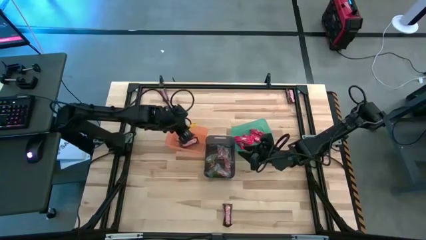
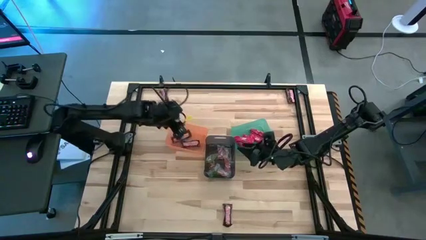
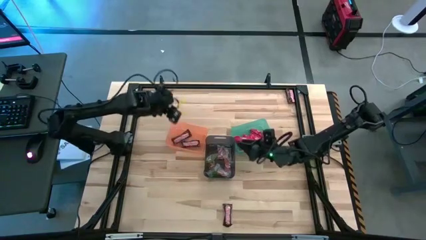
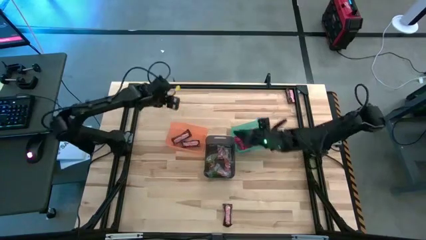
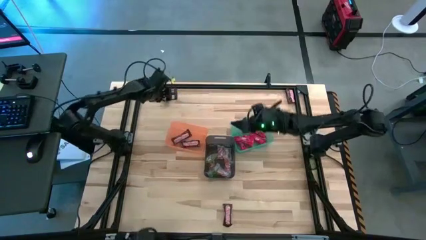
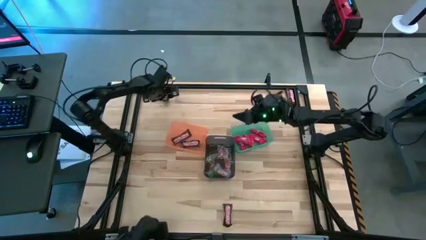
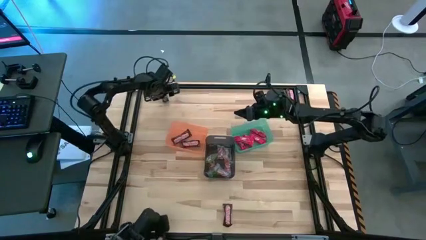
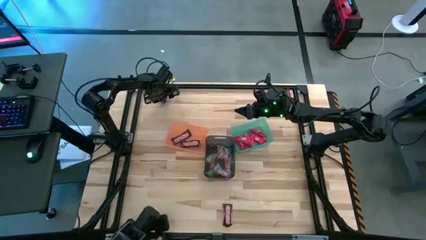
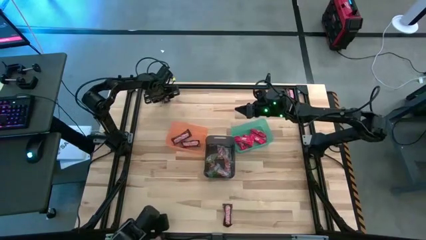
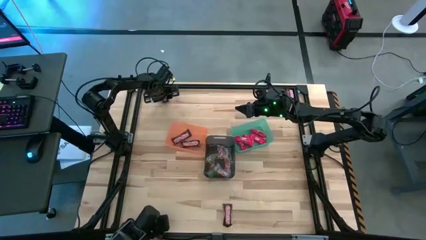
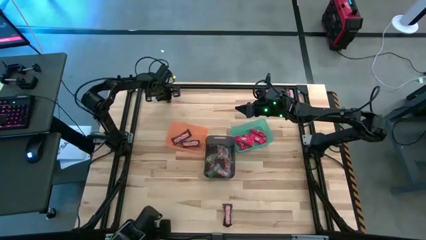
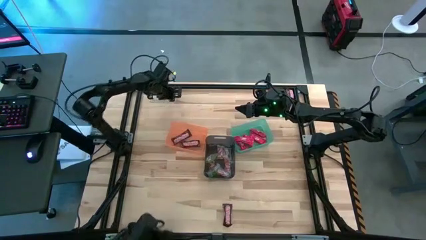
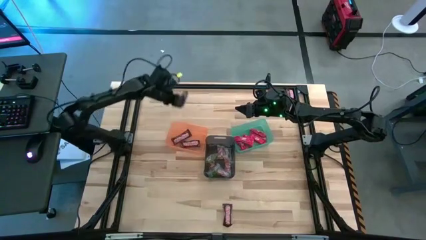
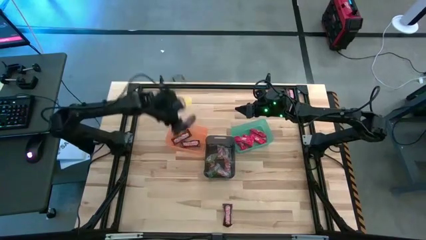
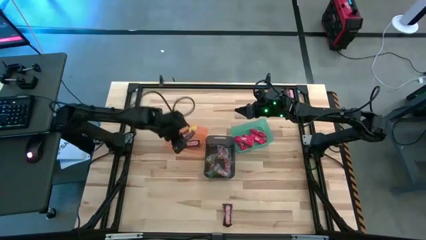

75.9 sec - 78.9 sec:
Task: Sort candy by brand, put in halloween buckets
Put the brown chocolate bar into the orange bin

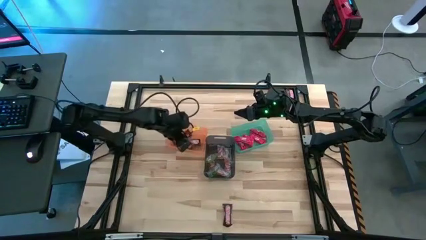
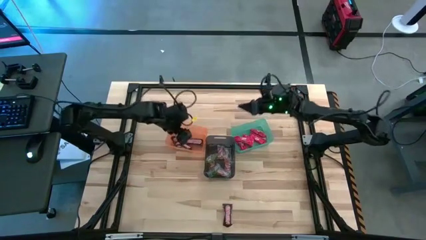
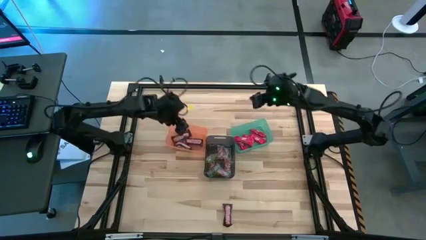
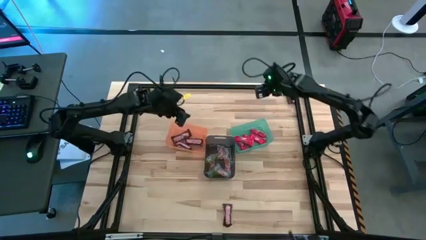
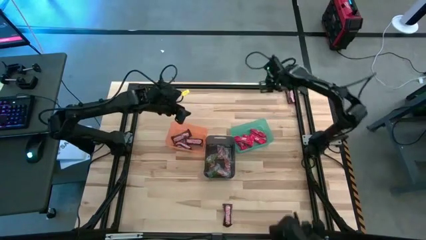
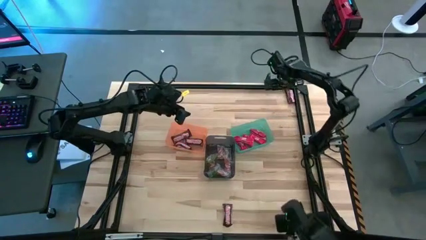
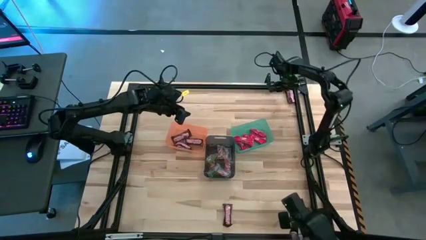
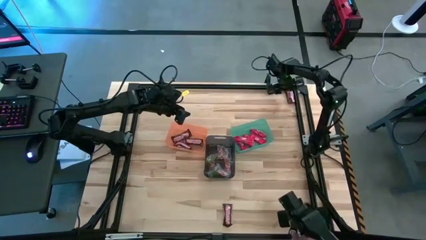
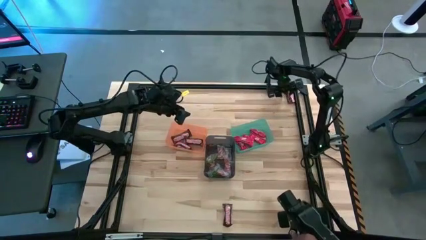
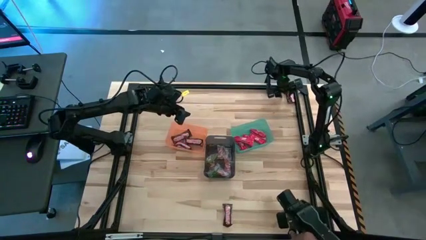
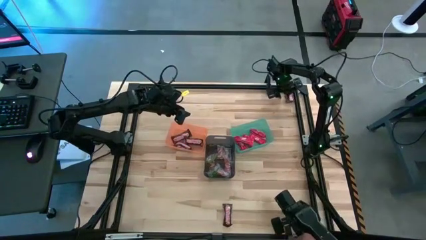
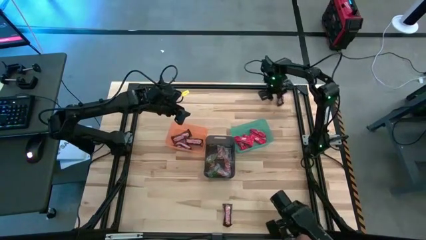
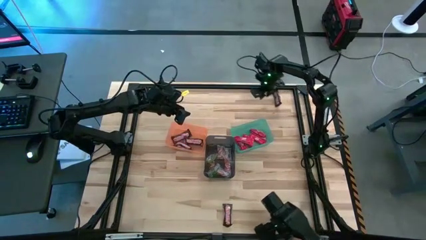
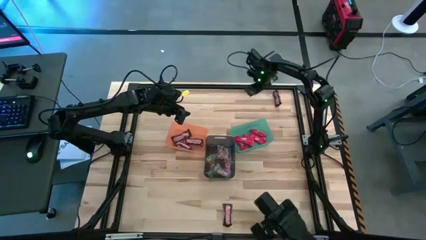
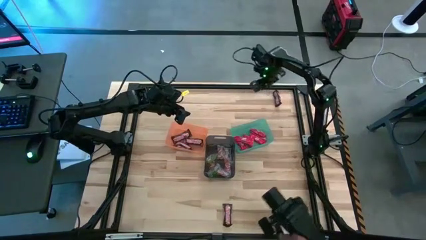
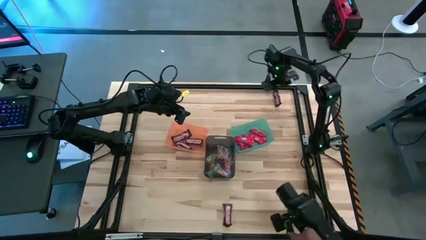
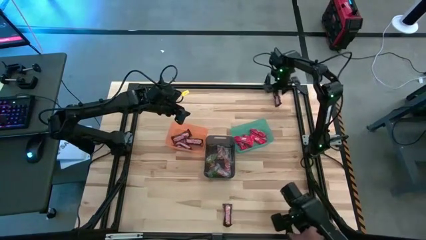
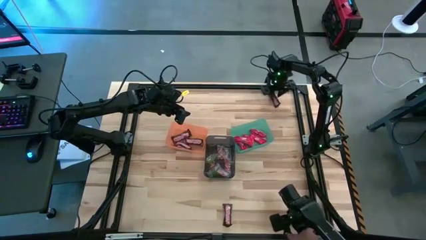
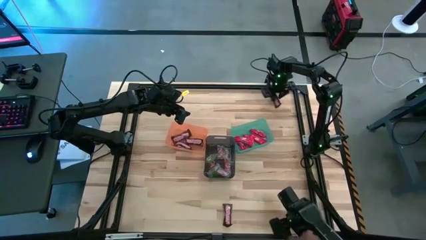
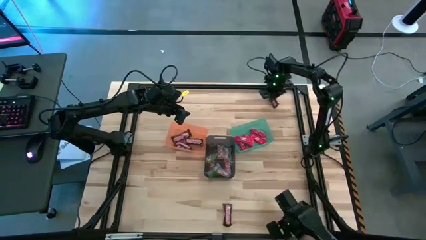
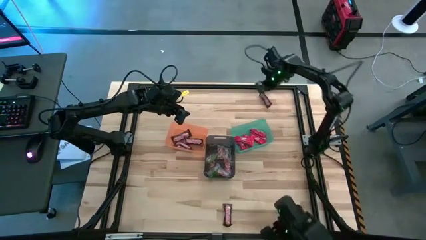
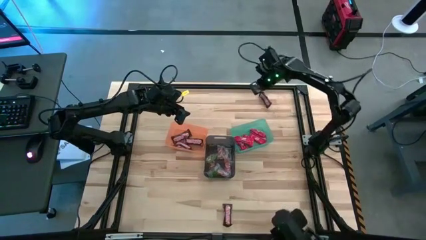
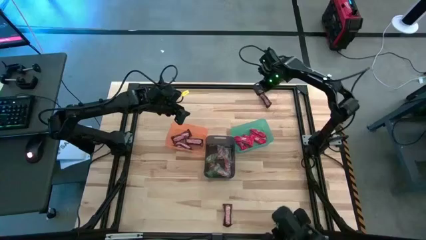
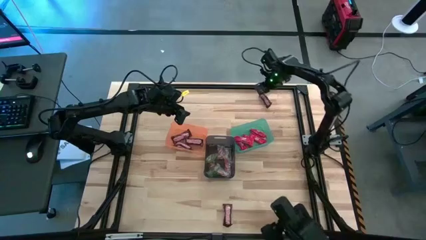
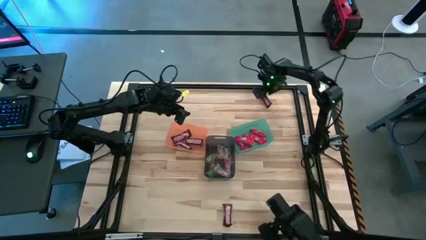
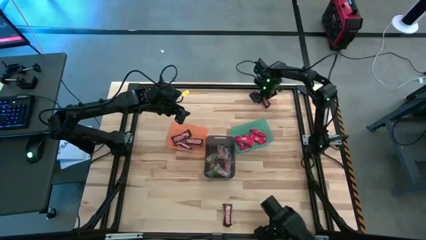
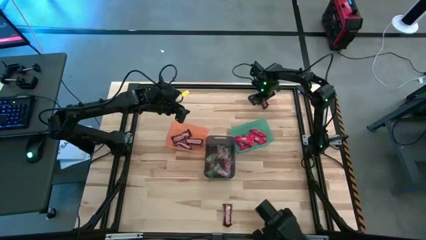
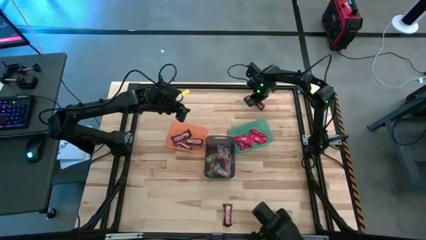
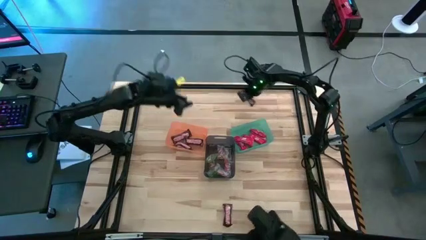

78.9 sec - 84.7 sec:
Put the brown chocolate bar into the orange bin

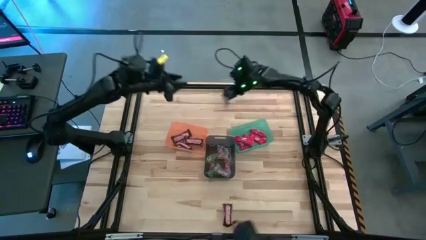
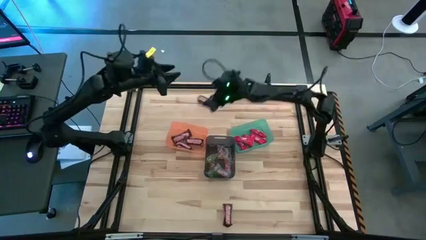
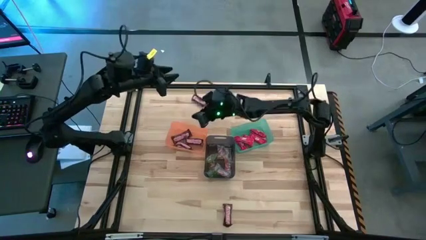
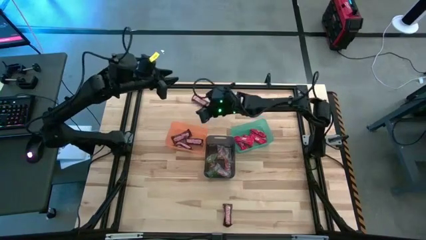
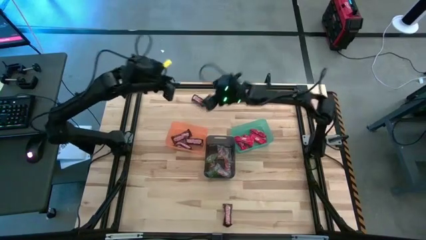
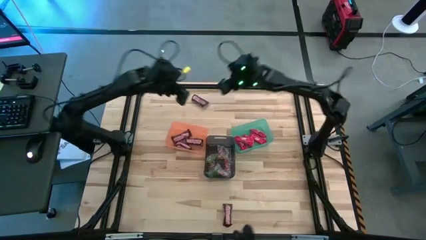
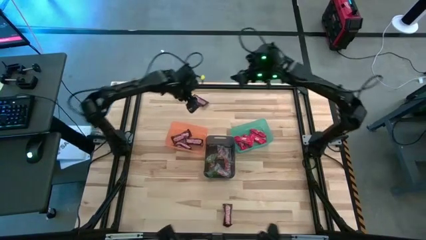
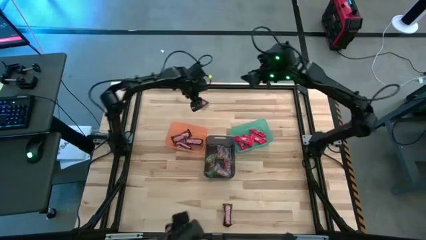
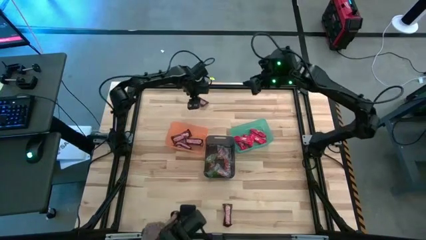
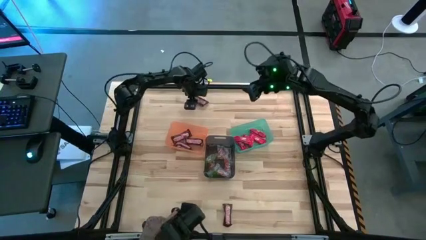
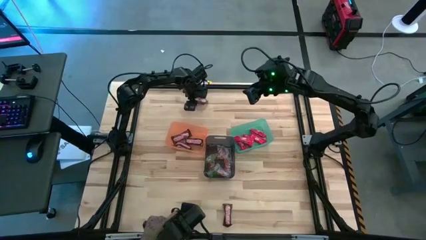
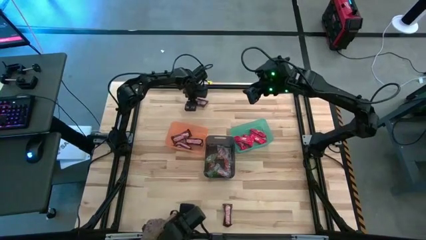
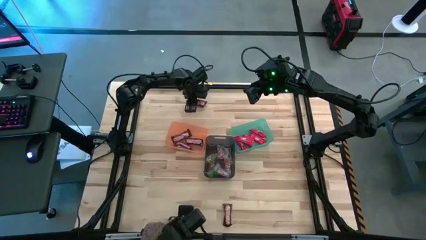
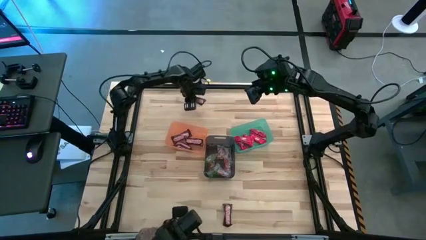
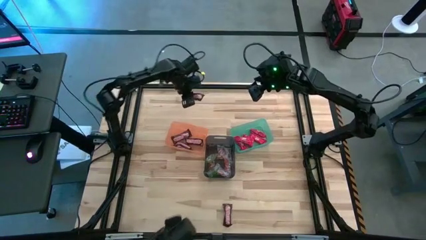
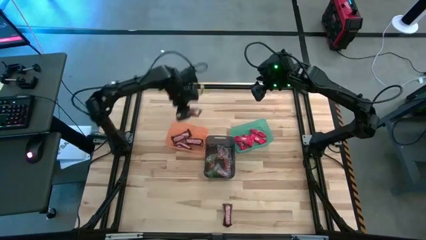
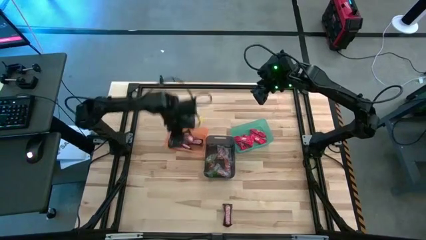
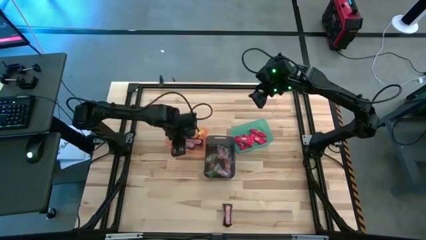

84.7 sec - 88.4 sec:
Put the brown chocolate bar into the orange bin

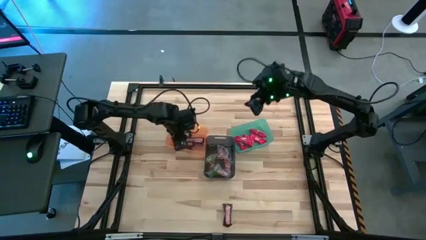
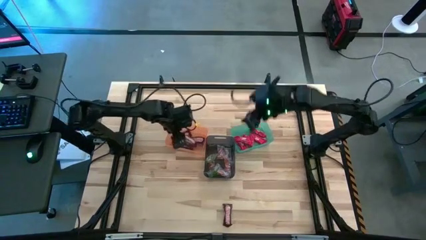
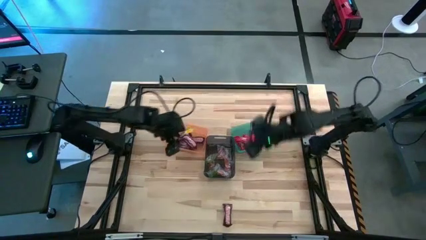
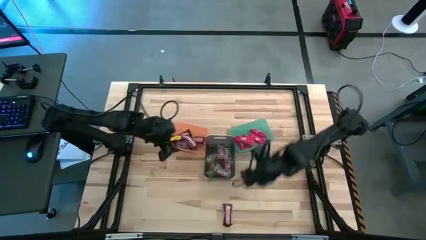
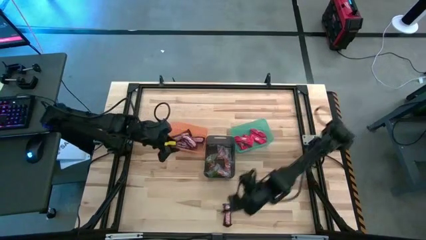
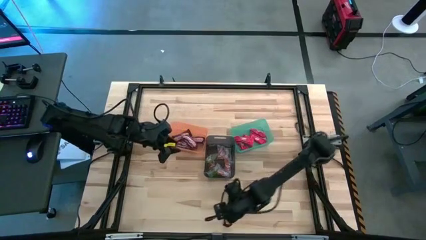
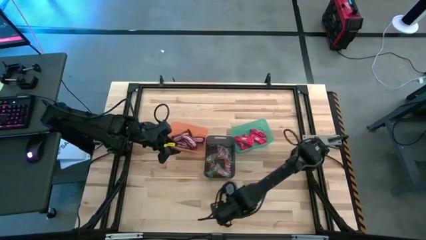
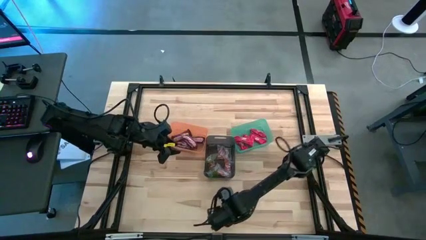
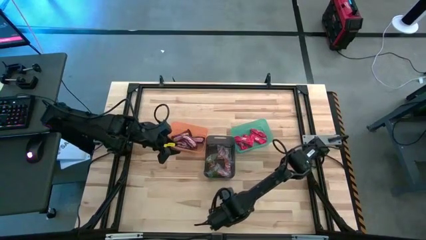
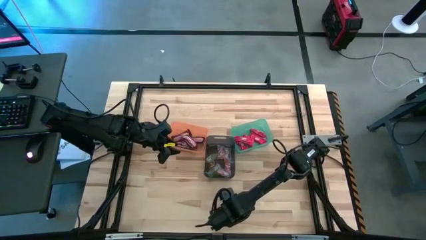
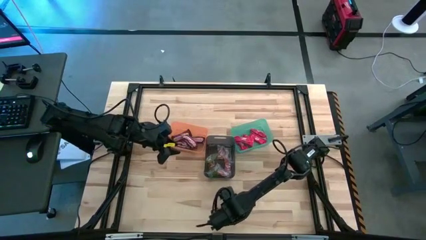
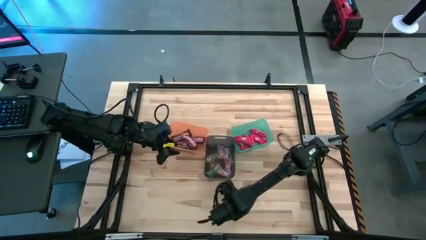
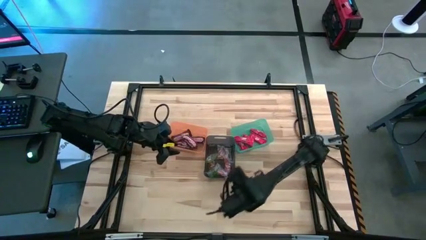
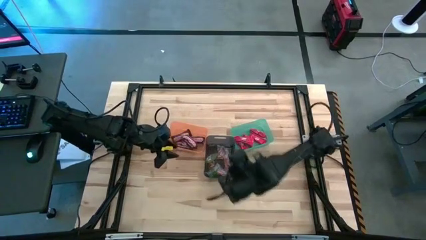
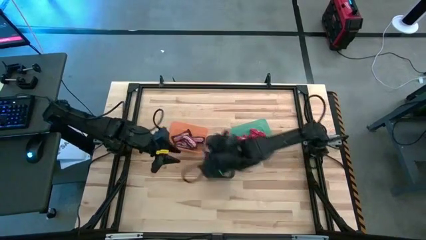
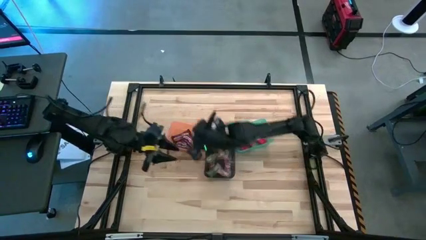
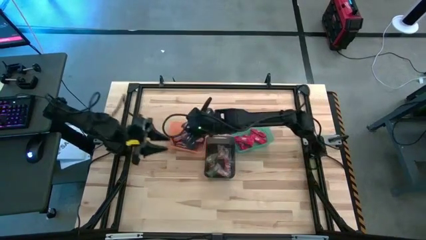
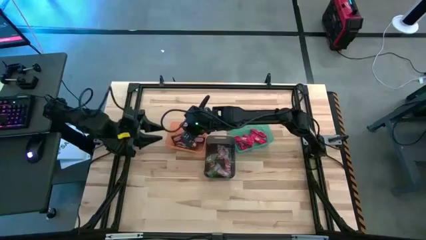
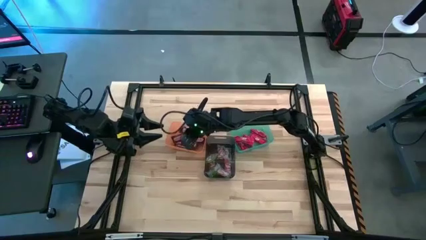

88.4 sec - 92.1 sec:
Put the brown chocolate bar into the orange bin
